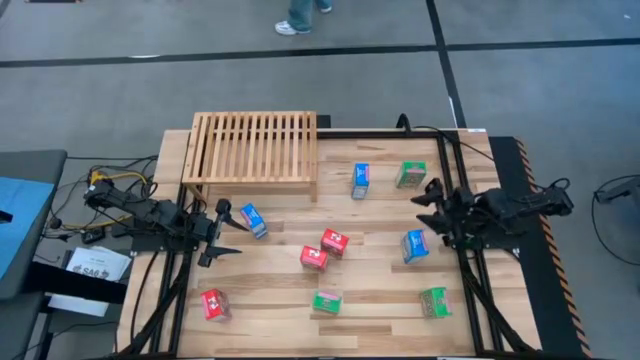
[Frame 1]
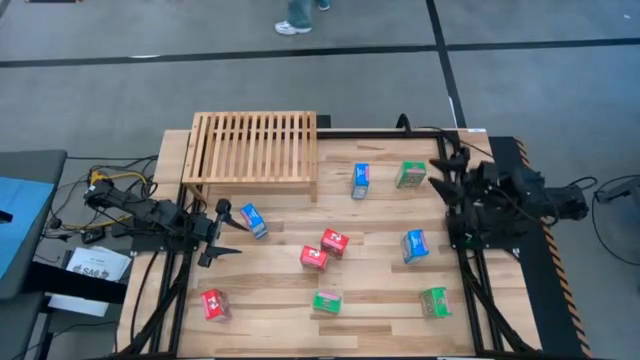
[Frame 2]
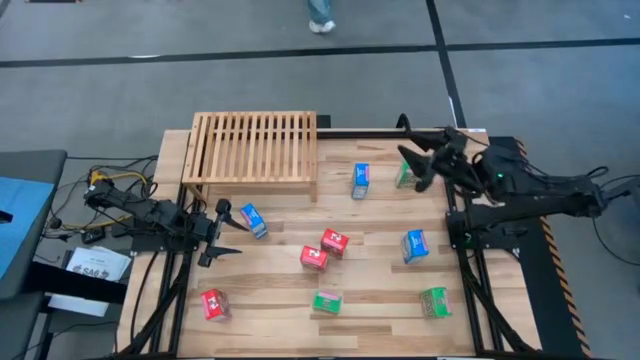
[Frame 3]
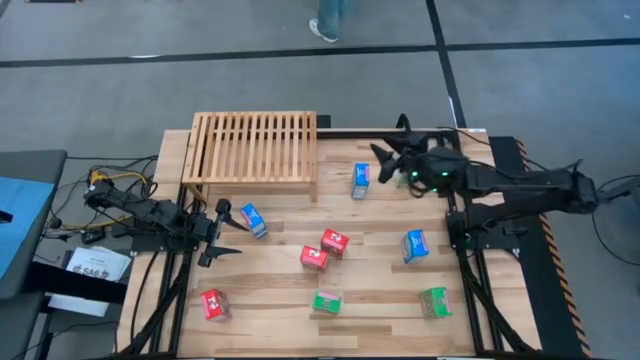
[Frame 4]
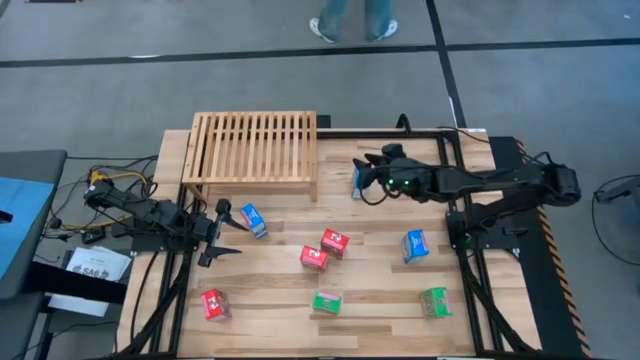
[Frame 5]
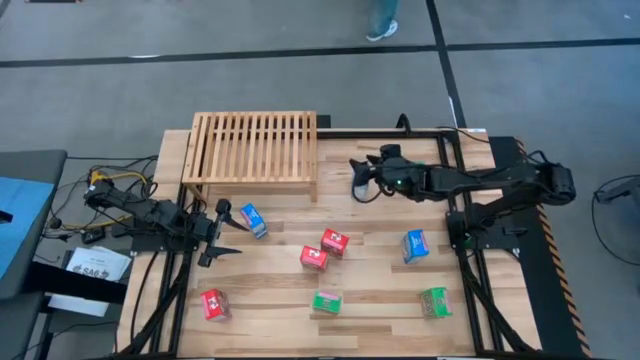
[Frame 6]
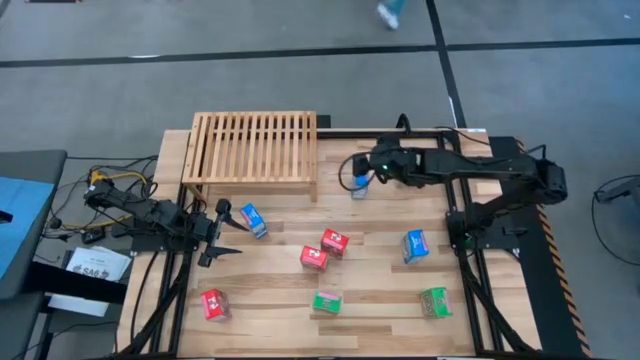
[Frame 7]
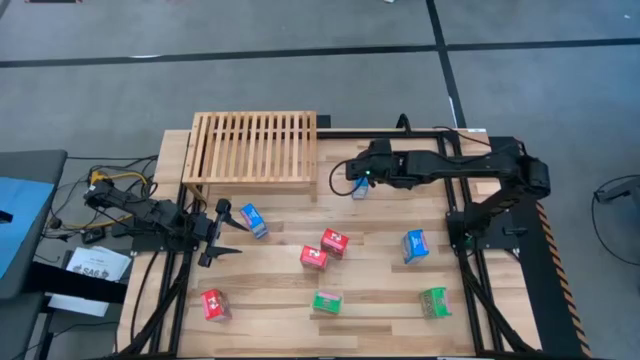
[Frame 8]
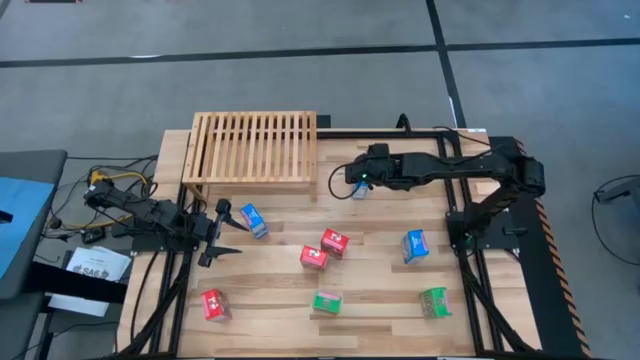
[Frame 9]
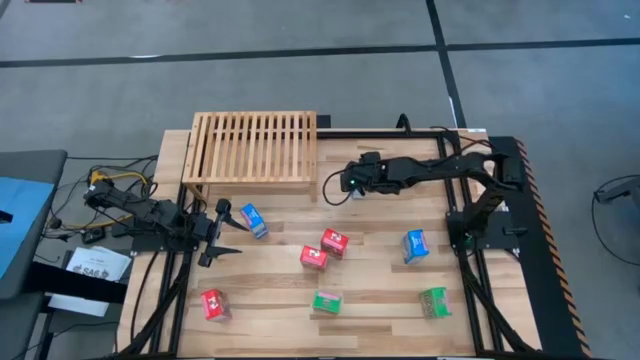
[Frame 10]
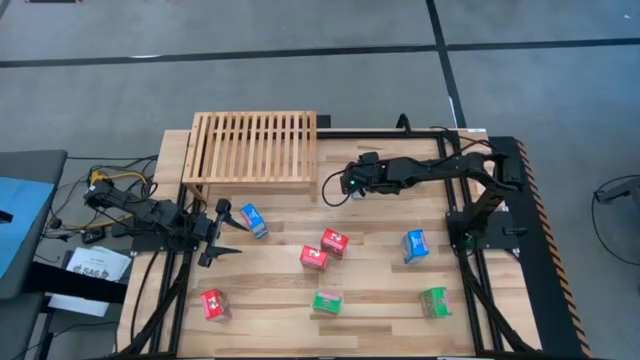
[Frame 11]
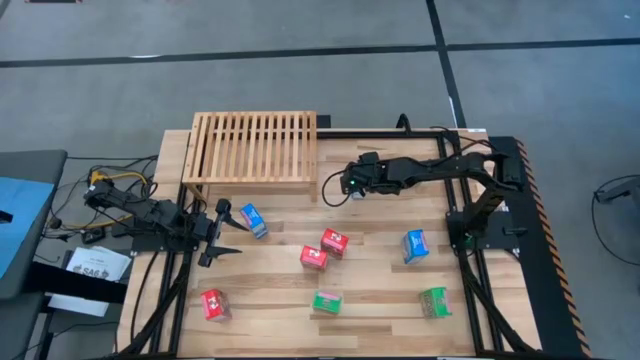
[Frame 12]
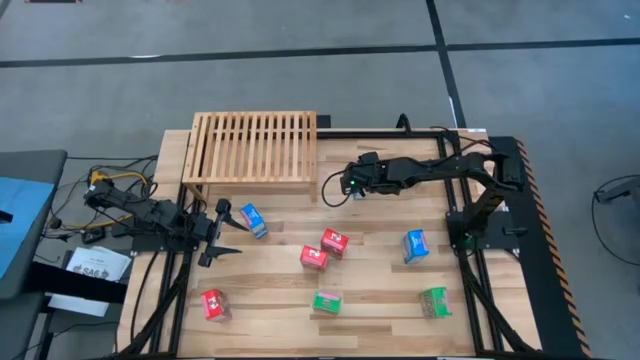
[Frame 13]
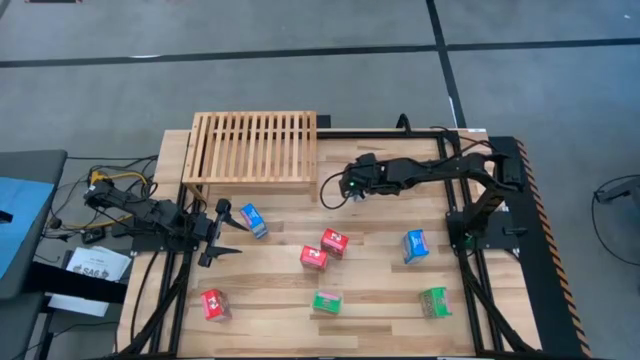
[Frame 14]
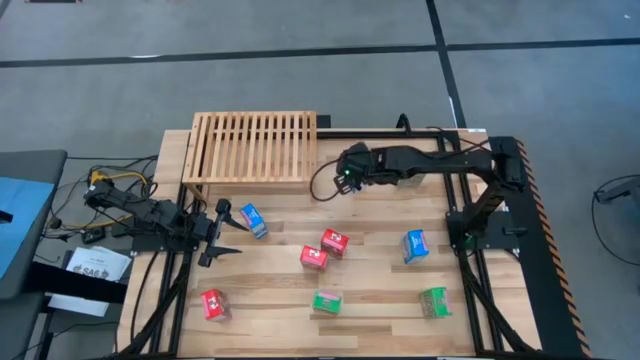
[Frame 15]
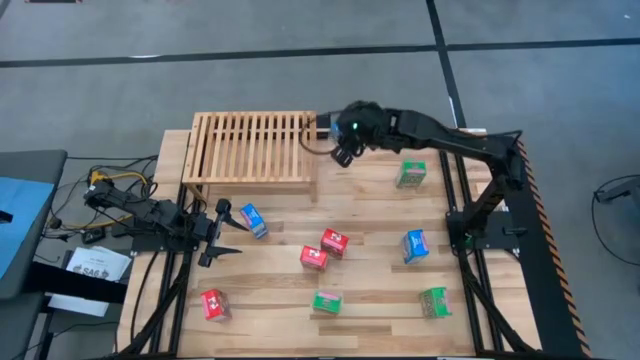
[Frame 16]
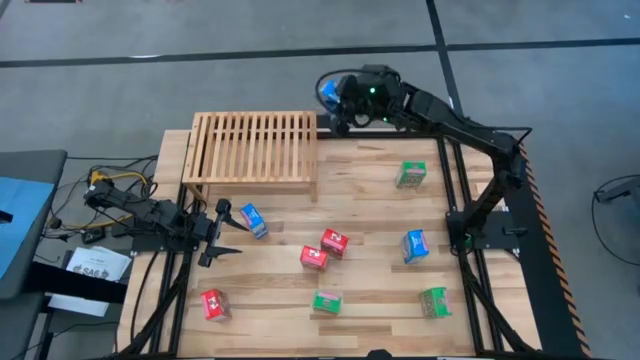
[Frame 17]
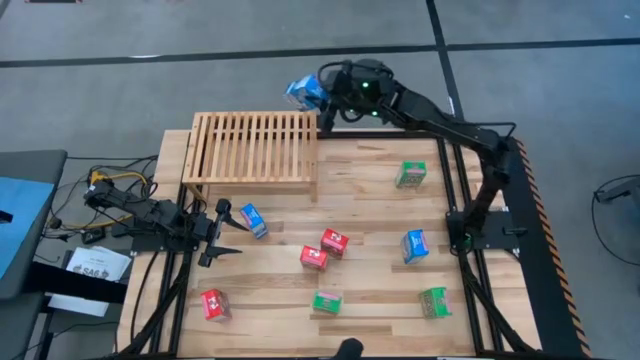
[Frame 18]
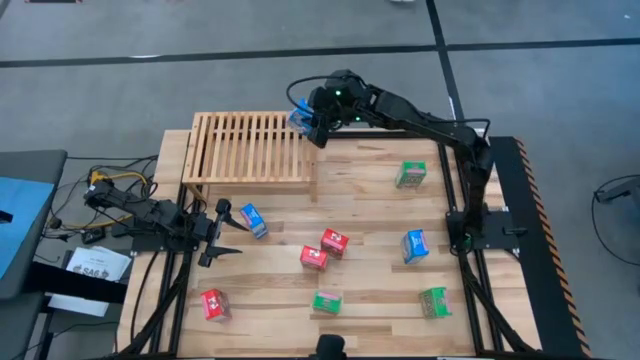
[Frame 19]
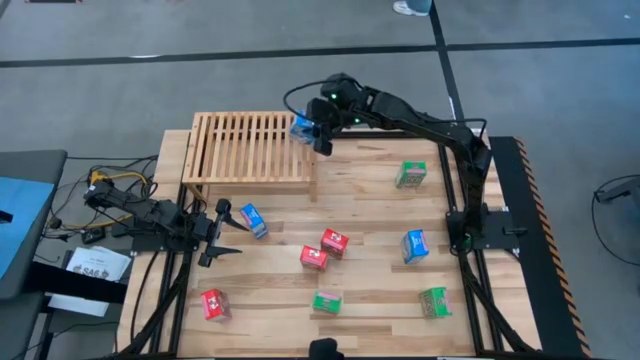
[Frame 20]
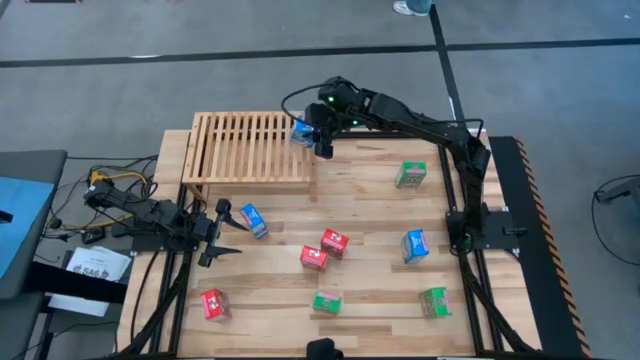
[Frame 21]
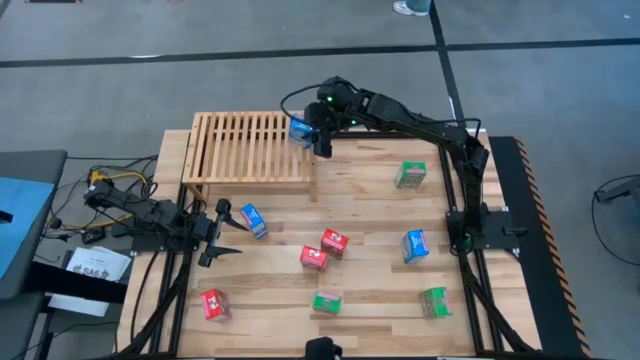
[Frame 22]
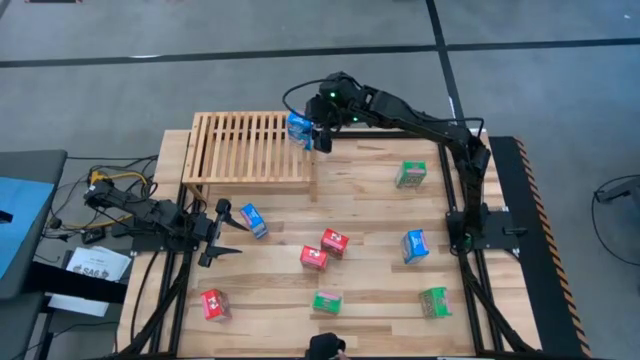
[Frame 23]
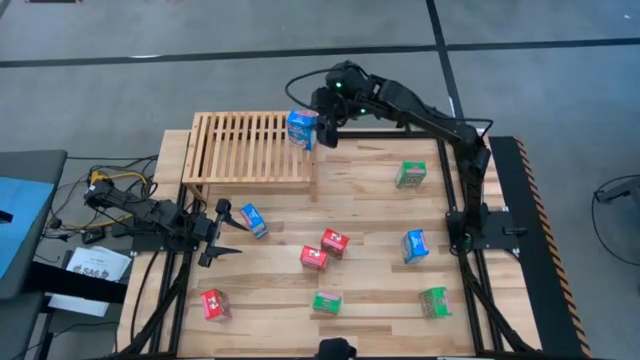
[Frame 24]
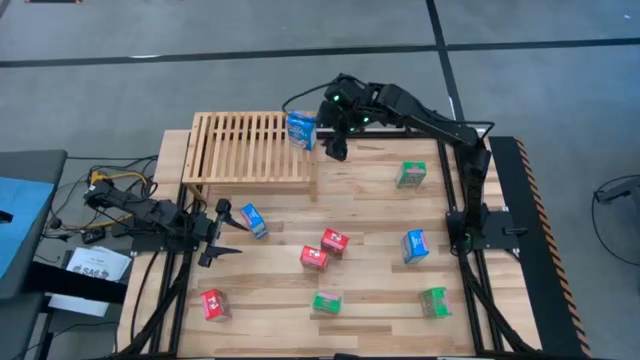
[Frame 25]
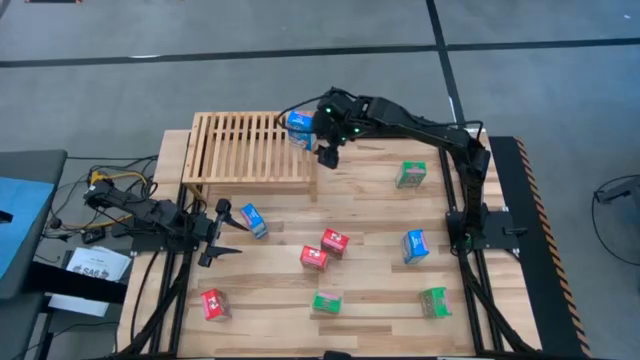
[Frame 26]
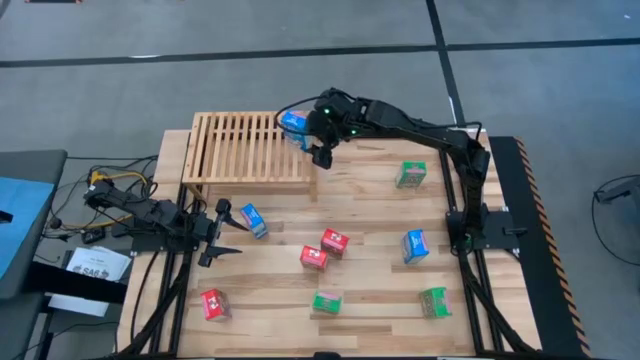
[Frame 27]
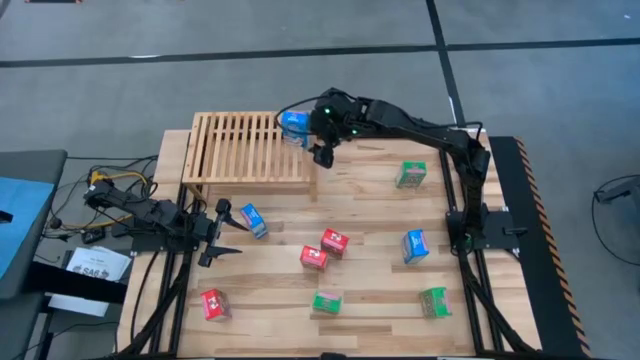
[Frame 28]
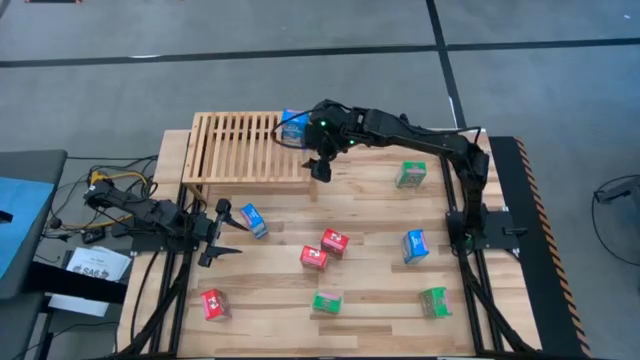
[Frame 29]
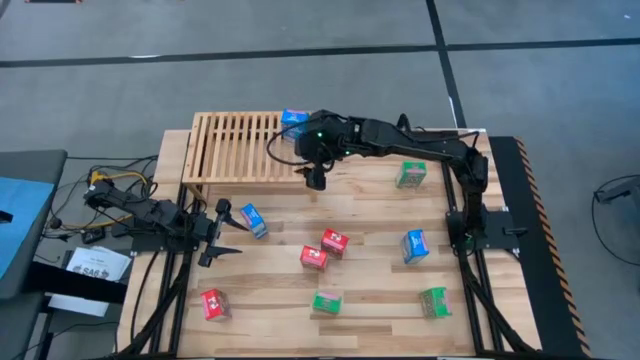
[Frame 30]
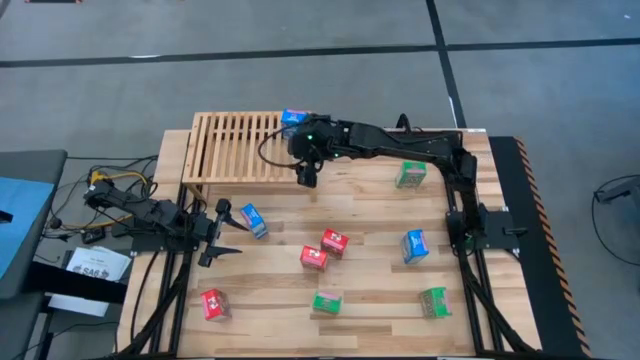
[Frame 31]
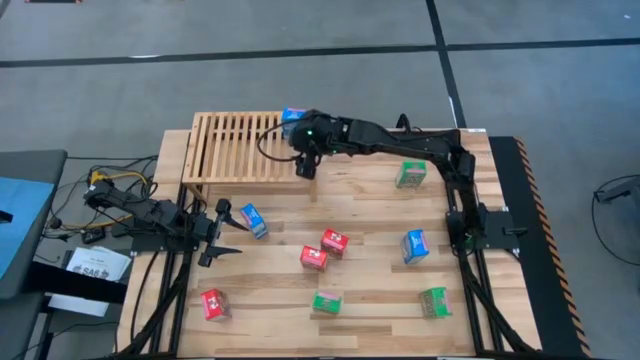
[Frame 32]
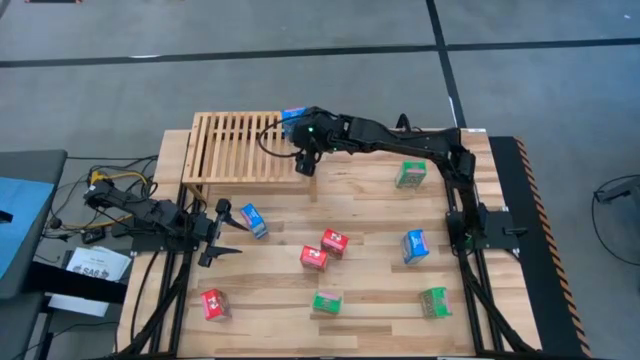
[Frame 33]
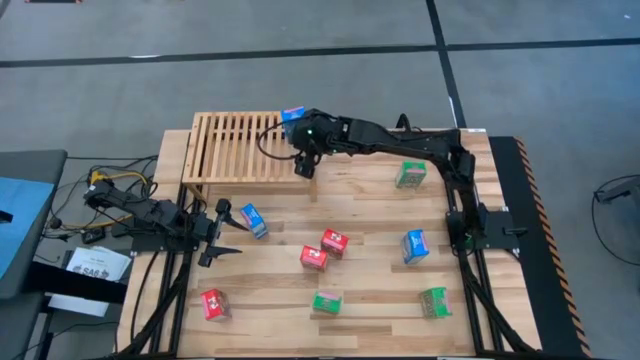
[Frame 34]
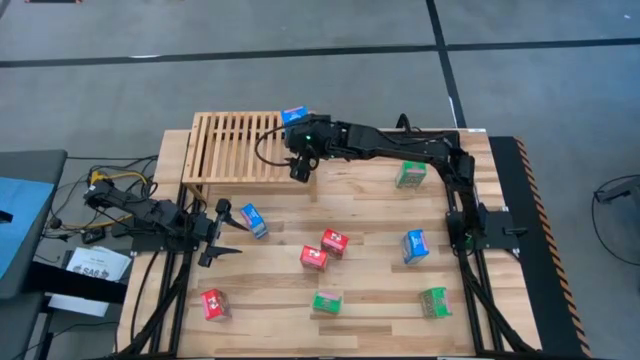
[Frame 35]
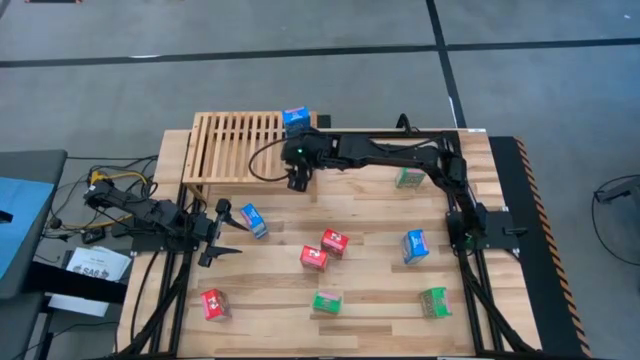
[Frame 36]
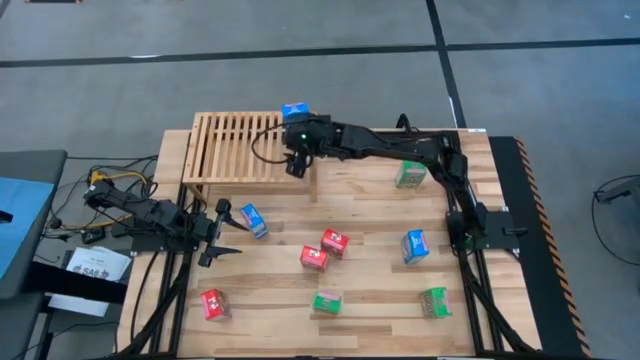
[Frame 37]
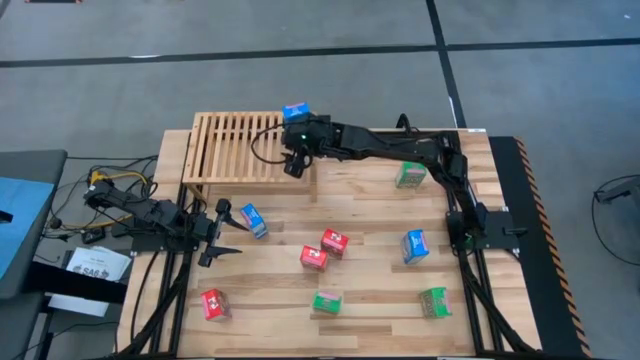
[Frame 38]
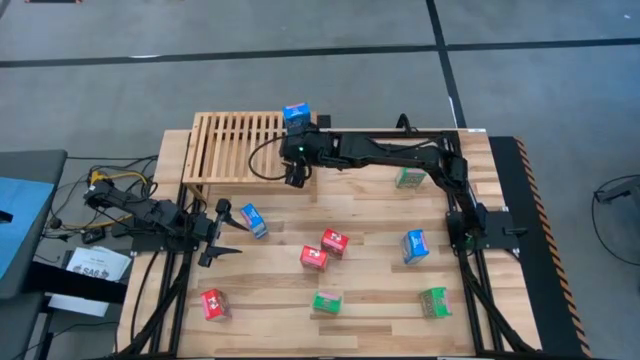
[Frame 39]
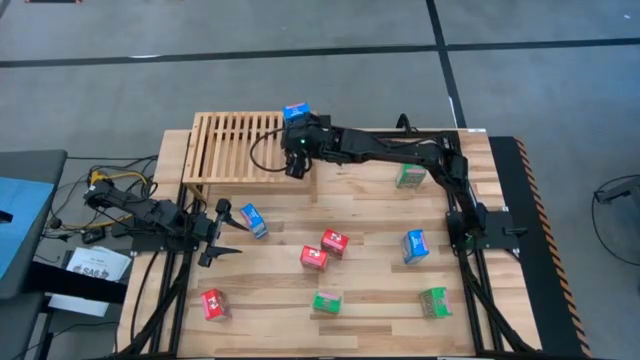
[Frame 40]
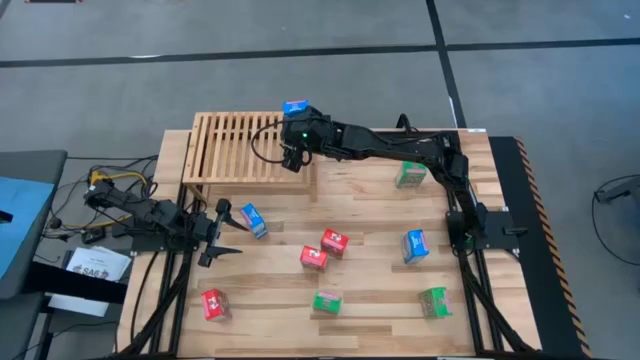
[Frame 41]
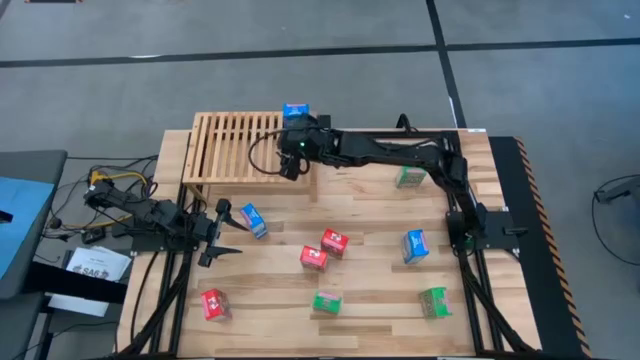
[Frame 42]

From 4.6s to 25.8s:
Task: Stack cereal on shelf
Put the middle blue cereal box on the shelf
